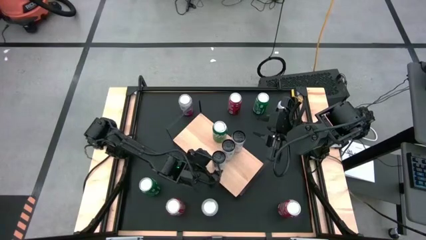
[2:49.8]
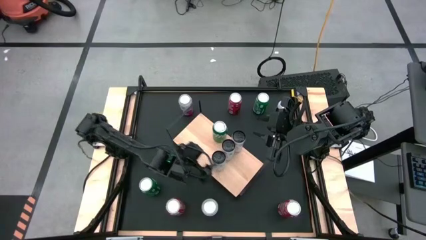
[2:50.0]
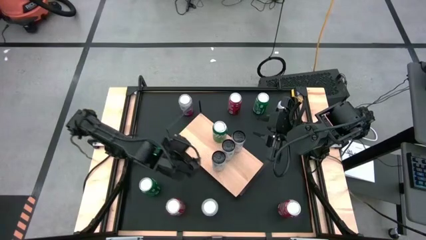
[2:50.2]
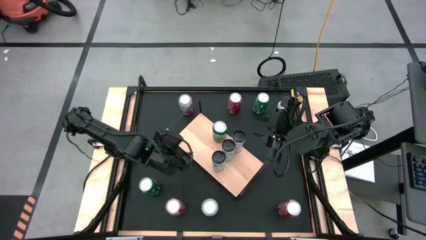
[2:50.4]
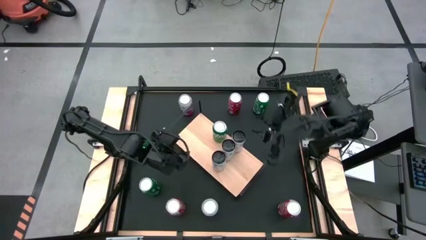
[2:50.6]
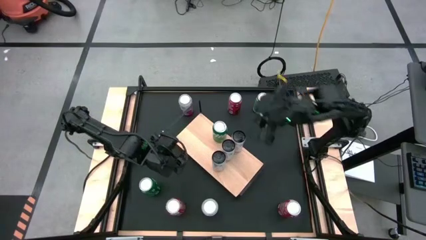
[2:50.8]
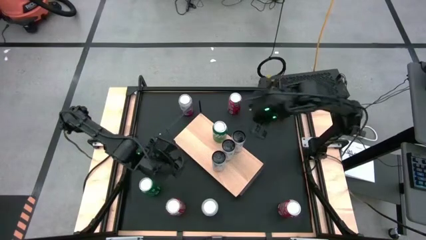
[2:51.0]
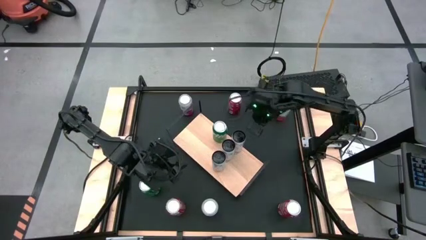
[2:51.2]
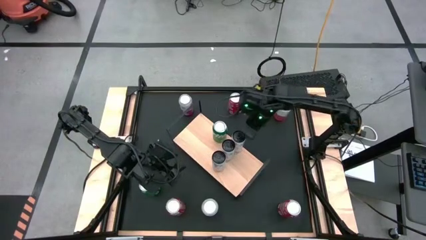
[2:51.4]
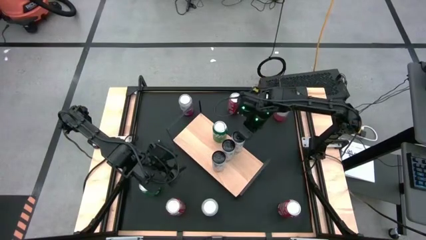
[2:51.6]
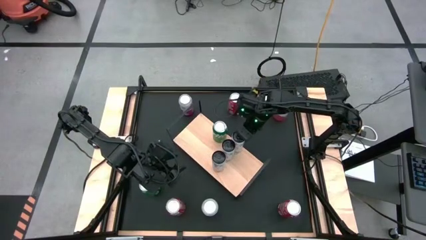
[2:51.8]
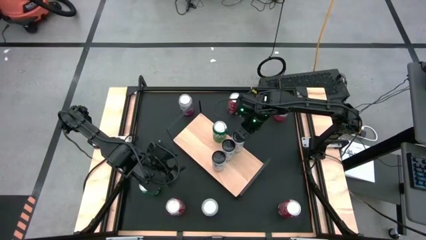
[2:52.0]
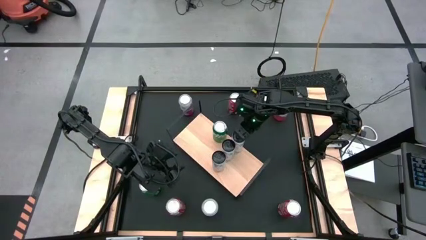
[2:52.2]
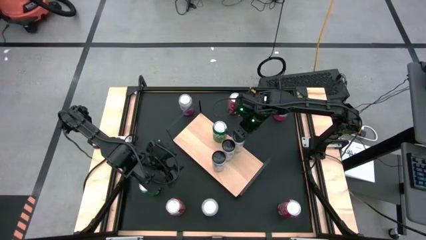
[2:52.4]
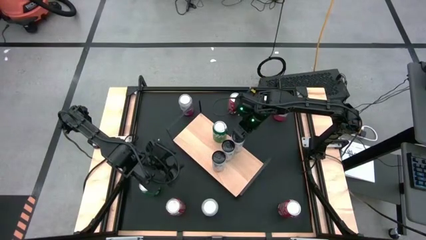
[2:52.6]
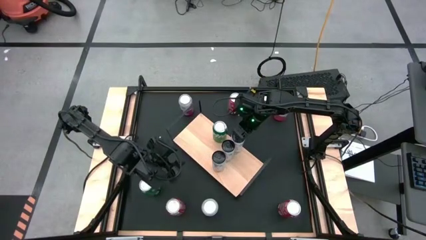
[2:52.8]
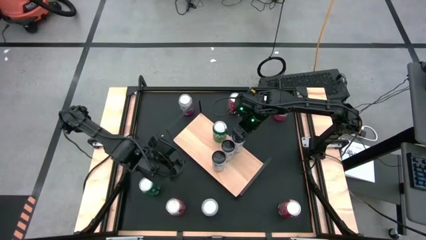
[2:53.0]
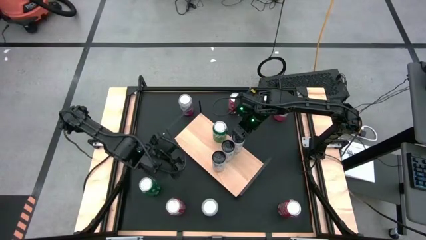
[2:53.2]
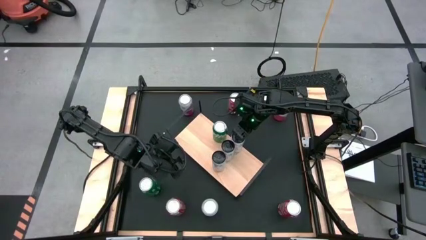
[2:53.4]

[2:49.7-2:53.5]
Task: Place canned beverage on shelf
Adjust the top white soda can on the shelf

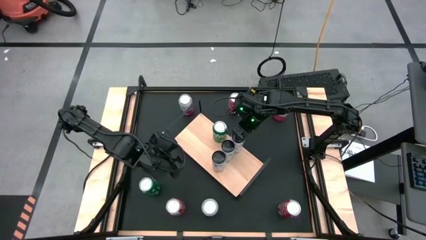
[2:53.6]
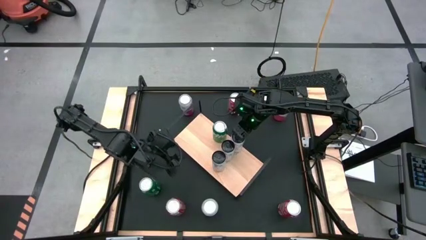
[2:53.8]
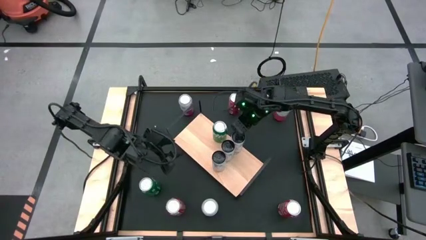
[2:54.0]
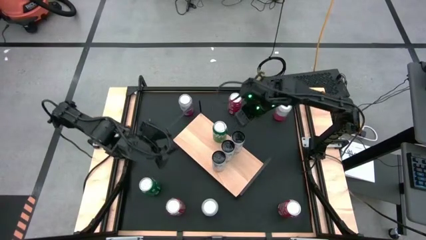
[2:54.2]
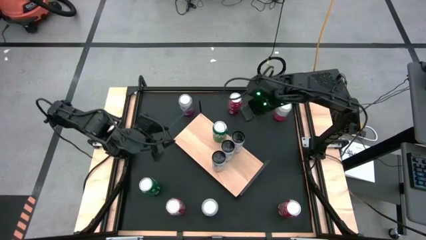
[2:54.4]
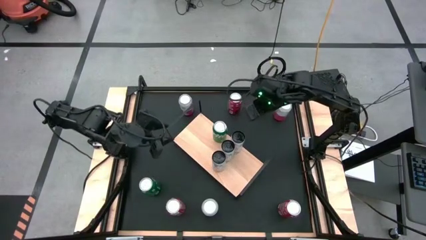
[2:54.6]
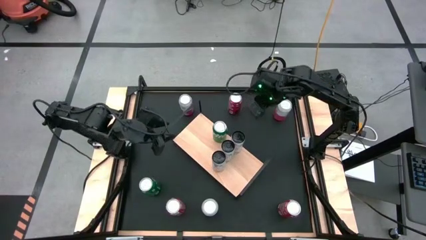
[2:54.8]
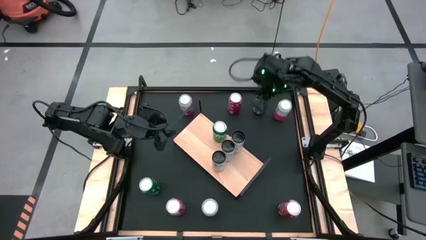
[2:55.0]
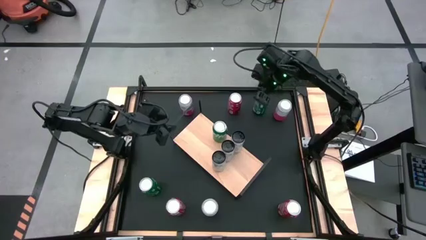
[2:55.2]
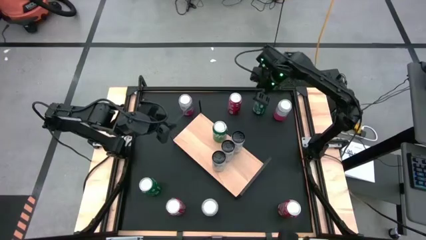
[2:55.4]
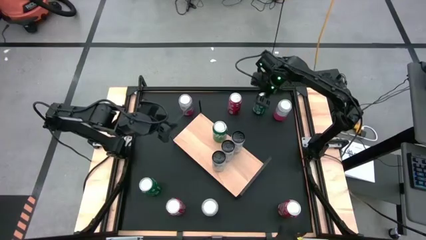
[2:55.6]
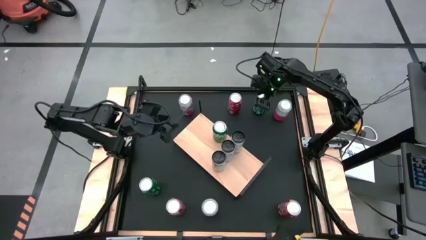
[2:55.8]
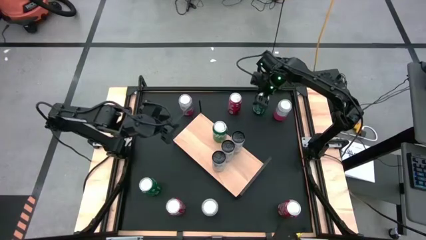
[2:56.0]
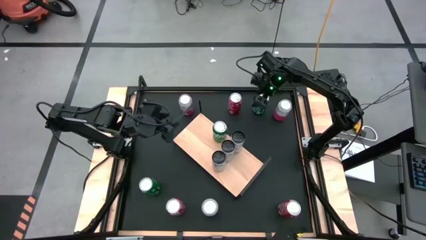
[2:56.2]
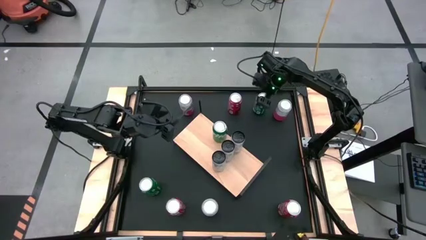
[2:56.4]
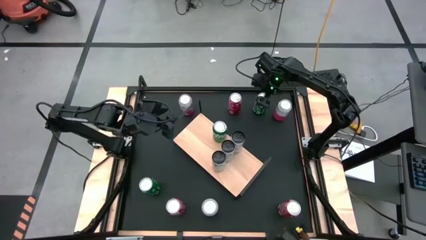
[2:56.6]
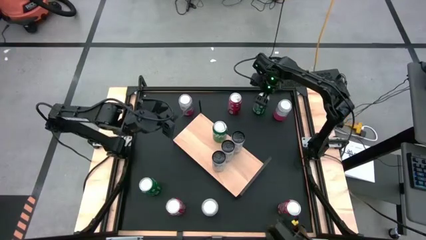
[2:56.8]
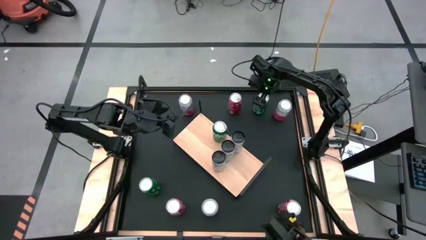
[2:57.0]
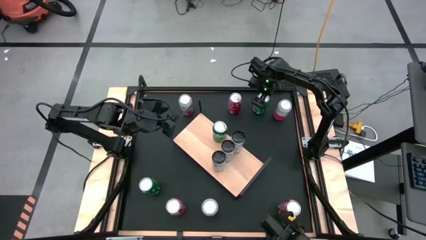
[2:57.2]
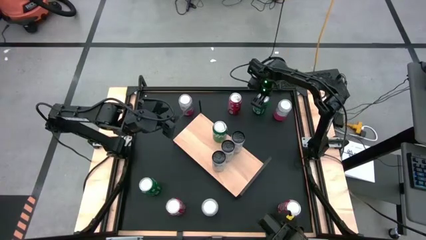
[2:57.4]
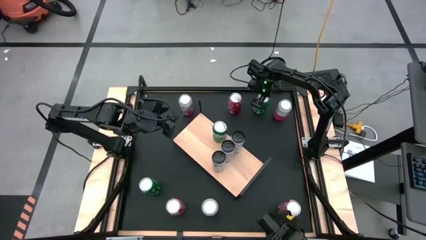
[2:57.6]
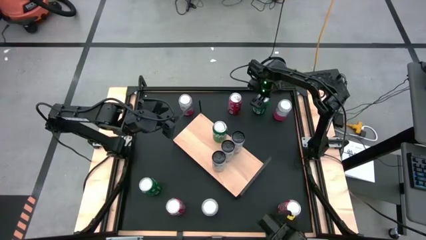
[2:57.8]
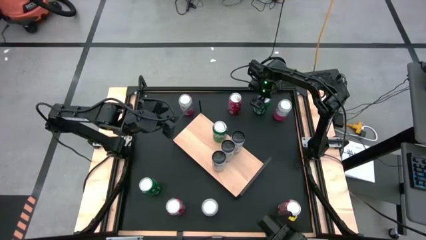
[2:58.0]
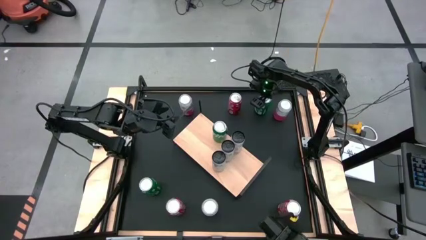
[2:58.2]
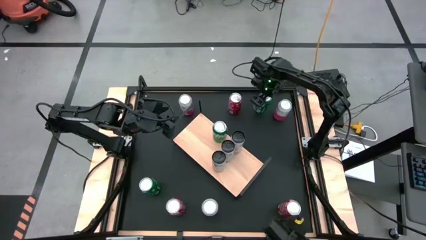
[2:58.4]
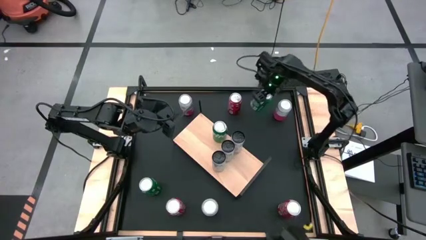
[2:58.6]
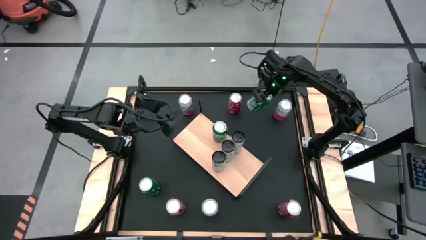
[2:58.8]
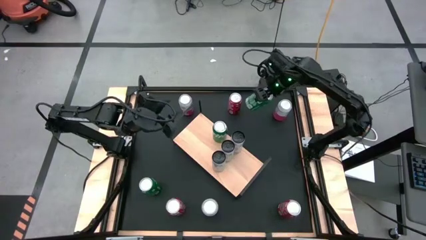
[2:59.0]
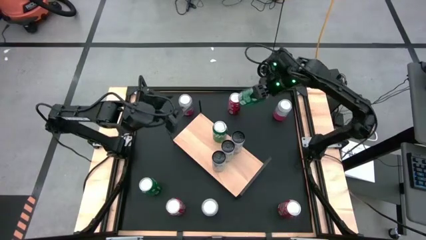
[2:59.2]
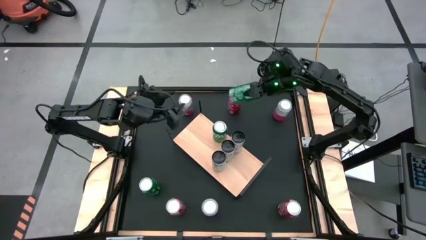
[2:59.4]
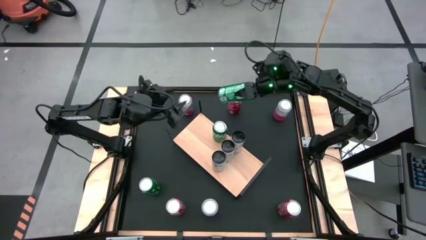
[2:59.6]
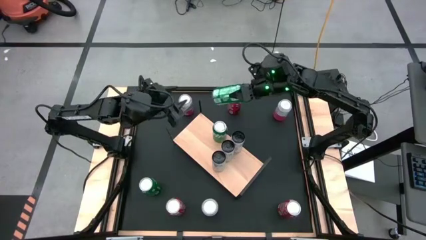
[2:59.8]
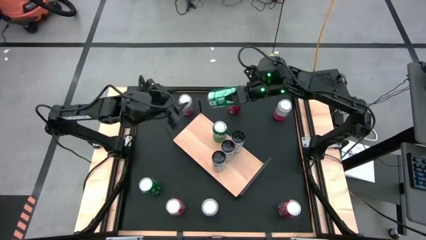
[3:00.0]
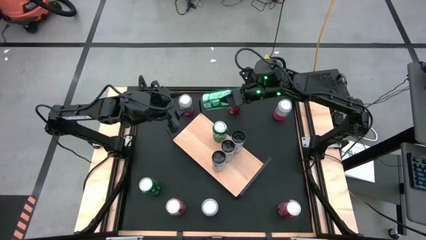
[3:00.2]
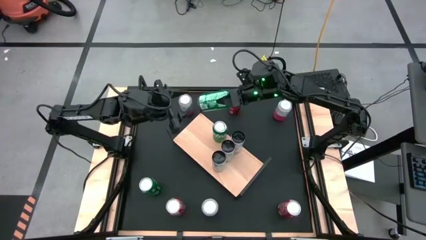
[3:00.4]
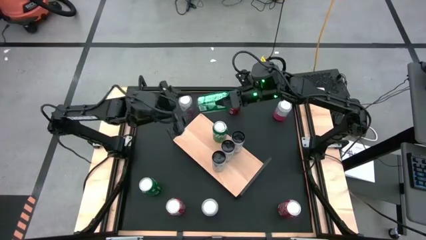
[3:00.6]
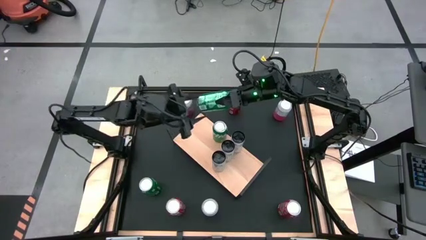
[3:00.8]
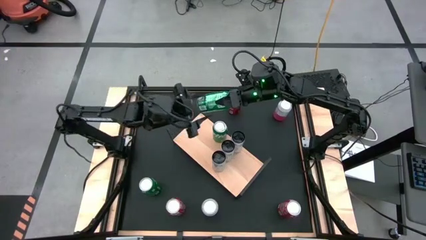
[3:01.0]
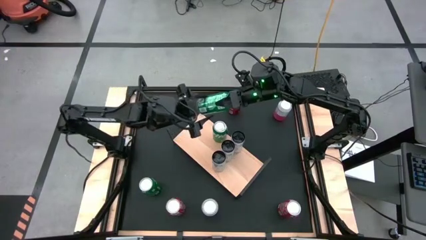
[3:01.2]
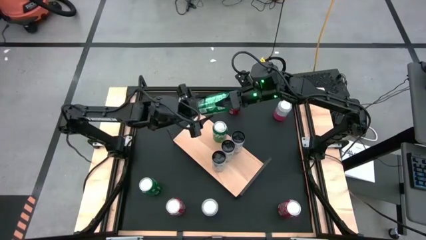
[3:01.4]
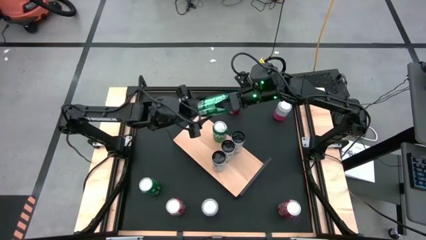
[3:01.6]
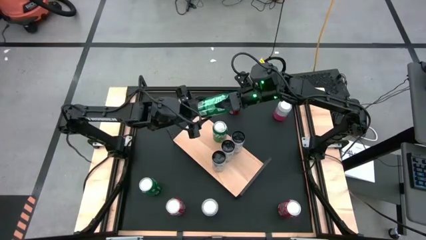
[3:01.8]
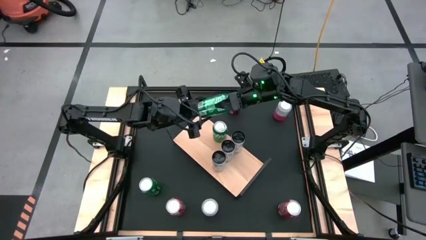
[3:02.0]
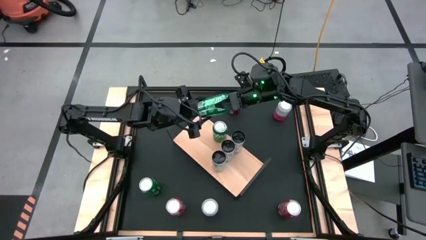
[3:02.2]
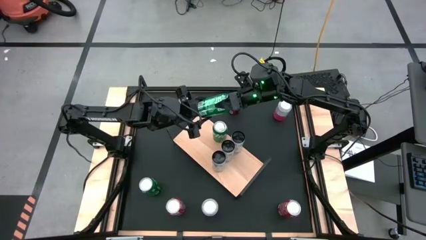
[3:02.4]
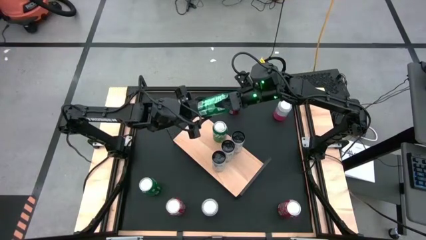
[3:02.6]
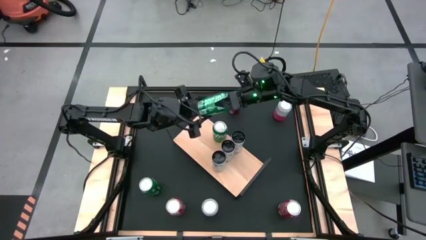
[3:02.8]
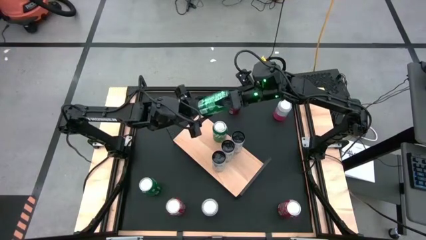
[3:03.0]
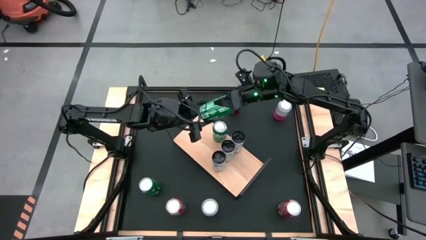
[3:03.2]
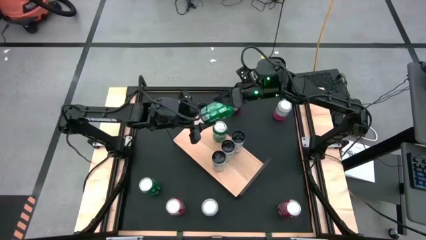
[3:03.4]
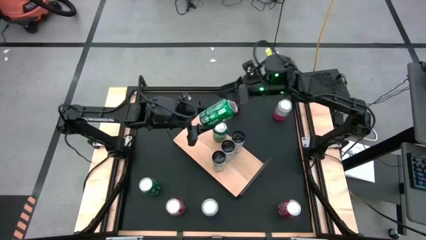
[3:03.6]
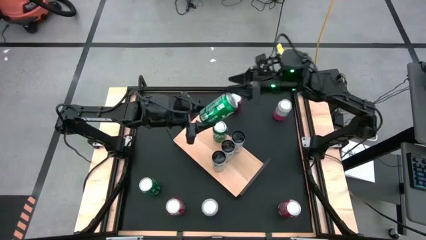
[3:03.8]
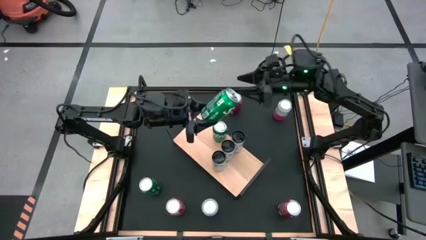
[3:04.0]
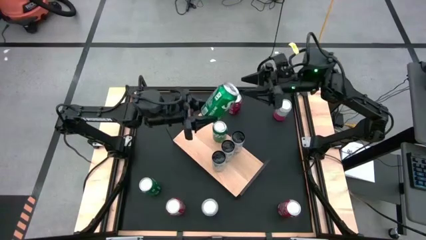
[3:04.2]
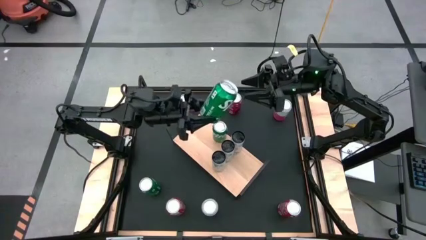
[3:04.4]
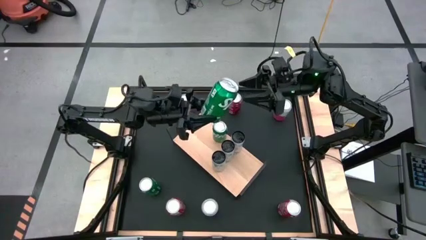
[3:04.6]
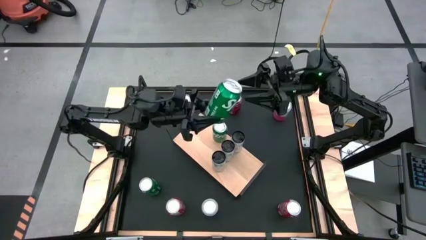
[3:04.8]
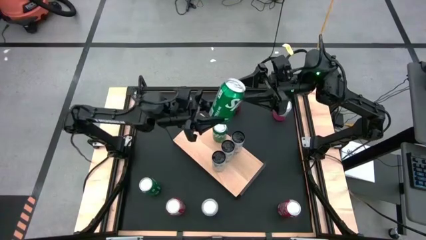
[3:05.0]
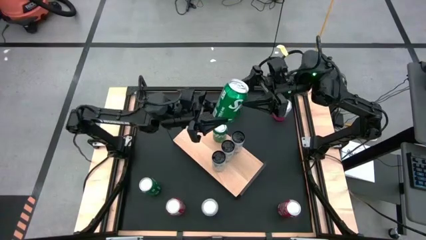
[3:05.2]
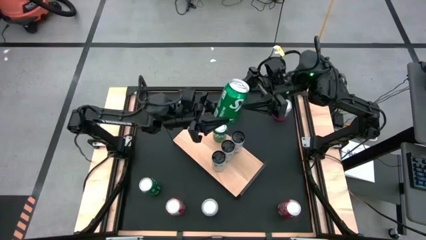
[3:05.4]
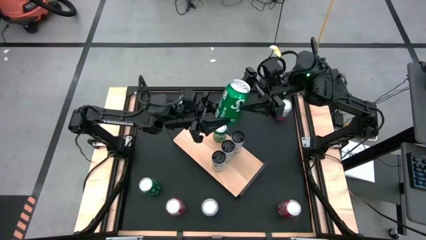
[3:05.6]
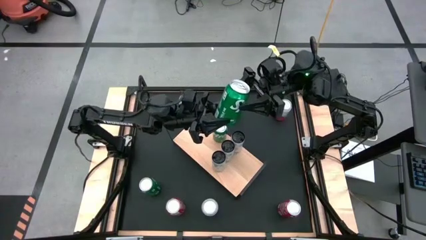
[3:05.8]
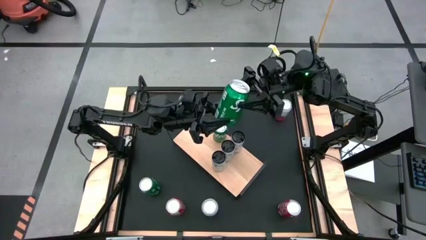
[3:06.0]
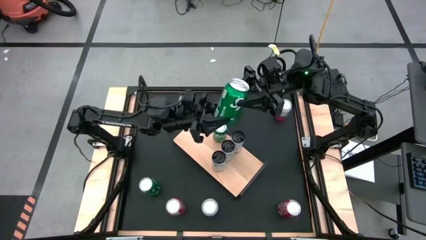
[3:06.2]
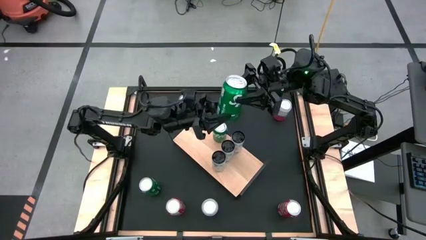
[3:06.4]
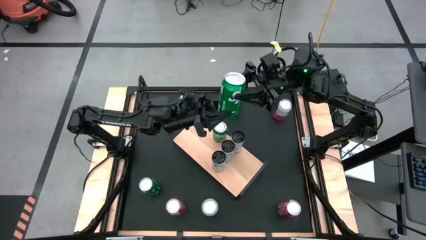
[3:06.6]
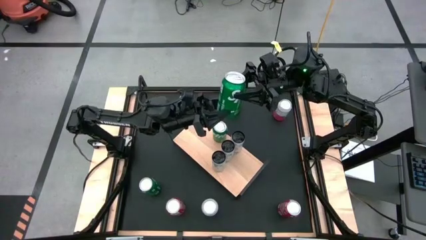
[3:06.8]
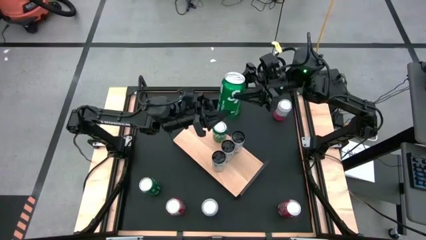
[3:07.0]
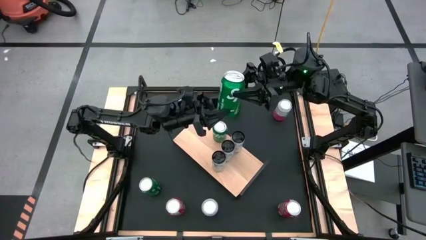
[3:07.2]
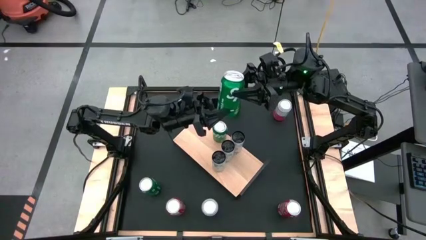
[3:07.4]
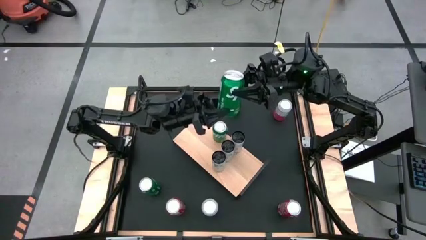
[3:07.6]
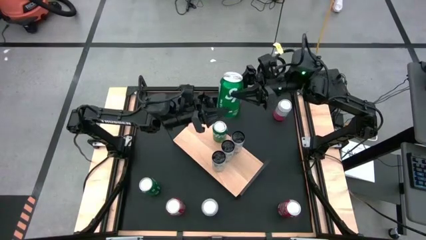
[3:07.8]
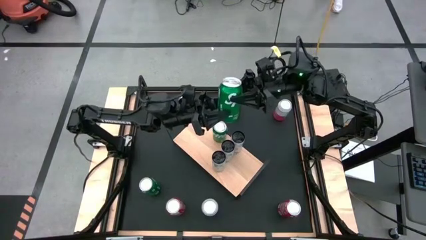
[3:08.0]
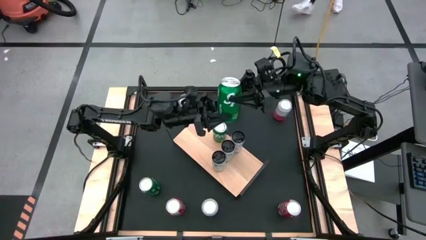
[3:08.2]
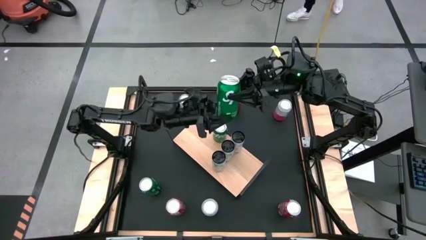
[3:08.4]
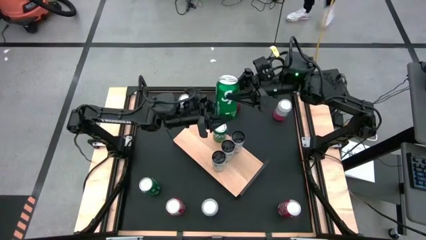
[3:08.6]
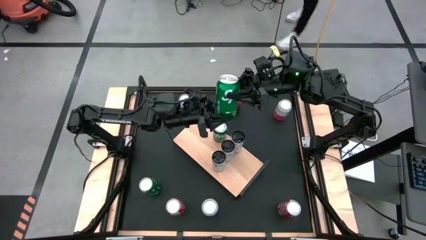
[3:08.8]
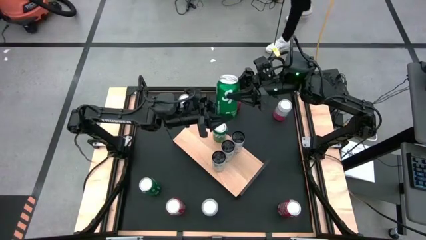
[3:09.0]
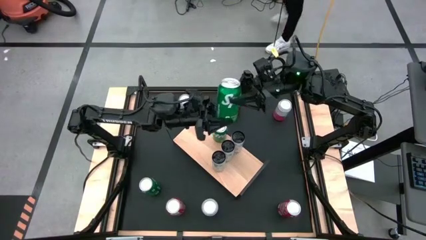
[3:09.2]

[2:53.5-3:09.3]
Put the top green soda can aligned with the other top green soda can
